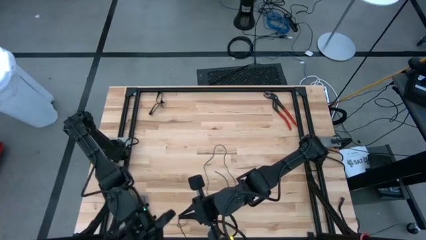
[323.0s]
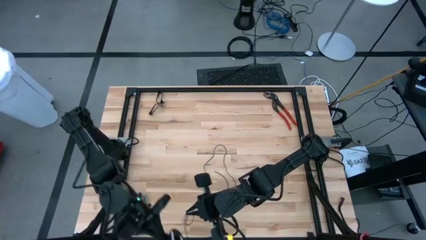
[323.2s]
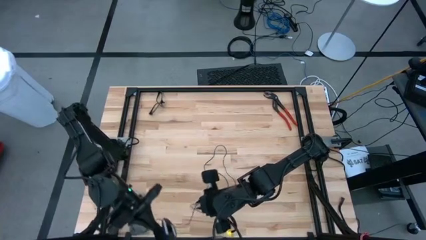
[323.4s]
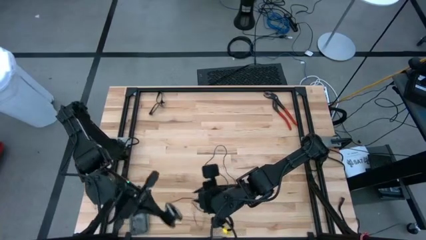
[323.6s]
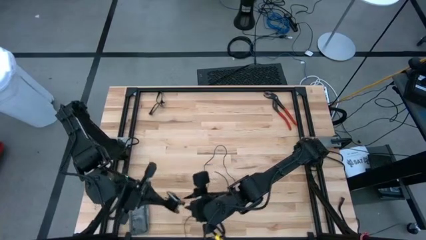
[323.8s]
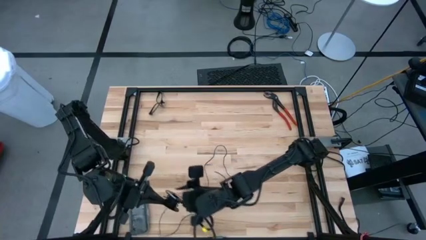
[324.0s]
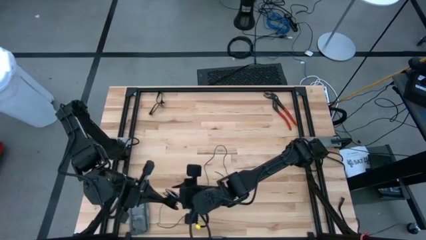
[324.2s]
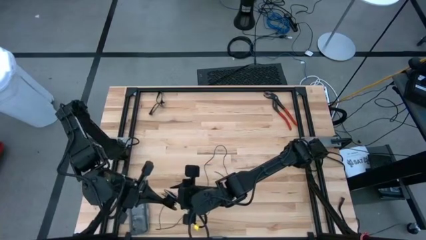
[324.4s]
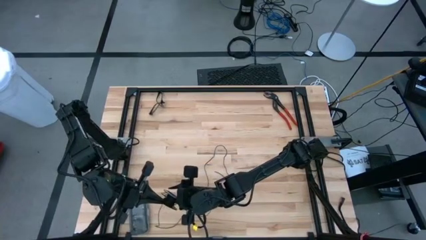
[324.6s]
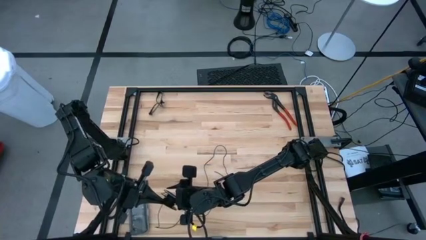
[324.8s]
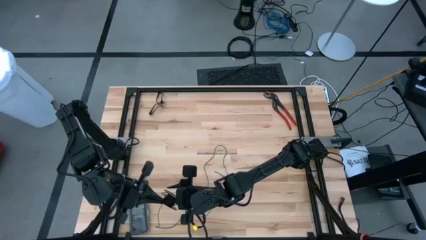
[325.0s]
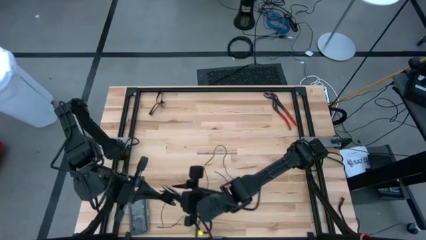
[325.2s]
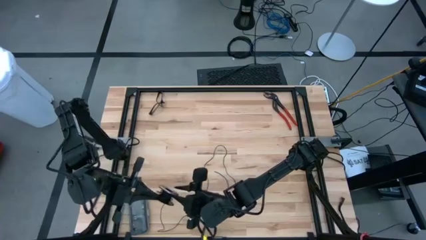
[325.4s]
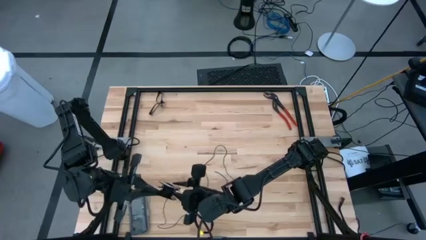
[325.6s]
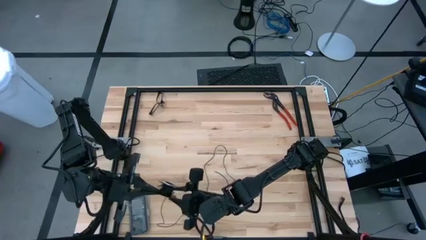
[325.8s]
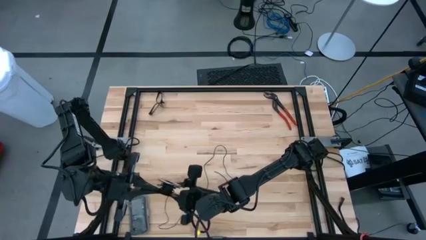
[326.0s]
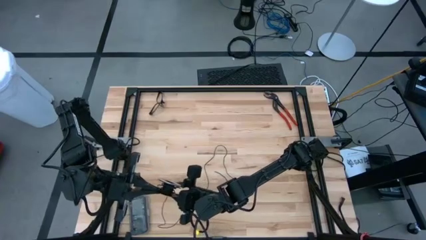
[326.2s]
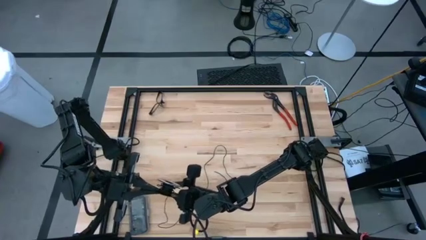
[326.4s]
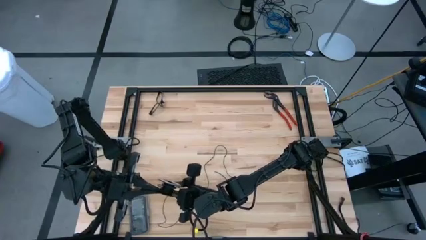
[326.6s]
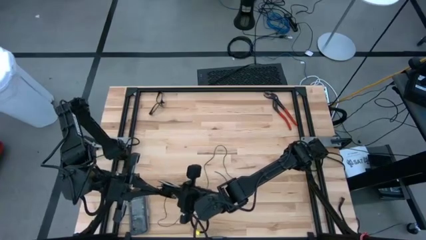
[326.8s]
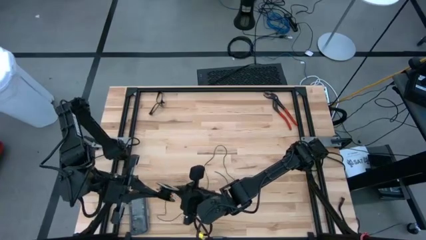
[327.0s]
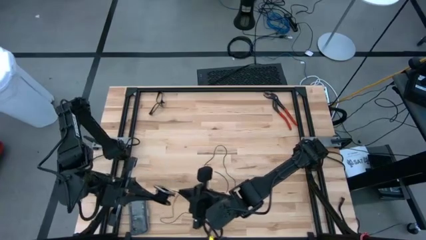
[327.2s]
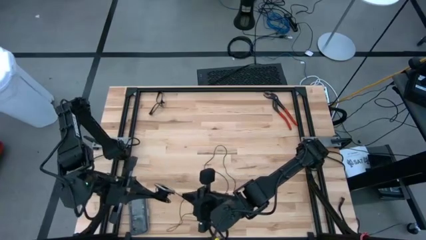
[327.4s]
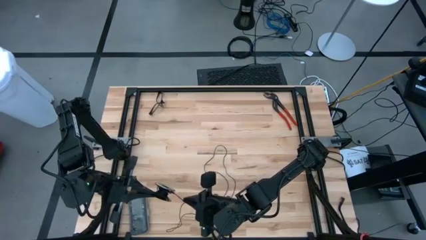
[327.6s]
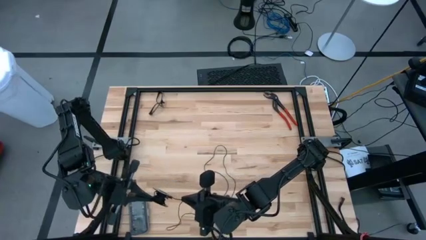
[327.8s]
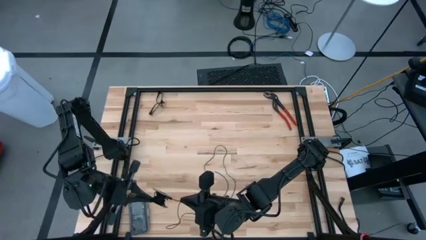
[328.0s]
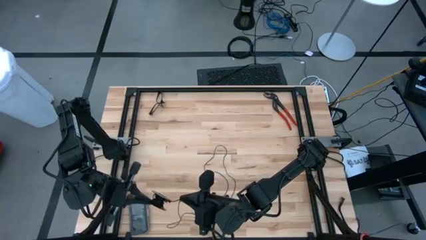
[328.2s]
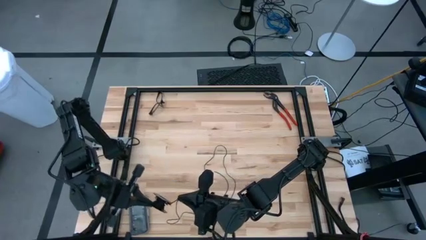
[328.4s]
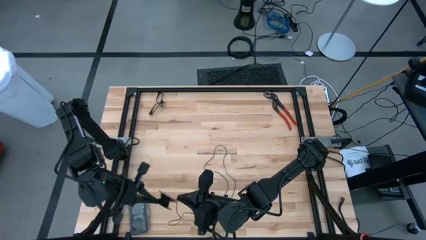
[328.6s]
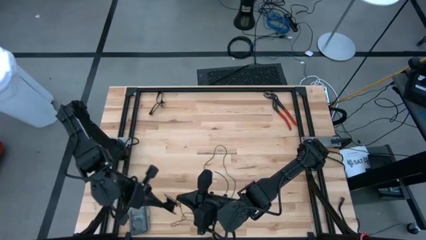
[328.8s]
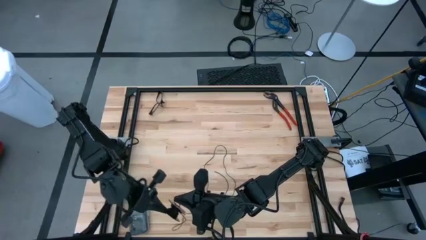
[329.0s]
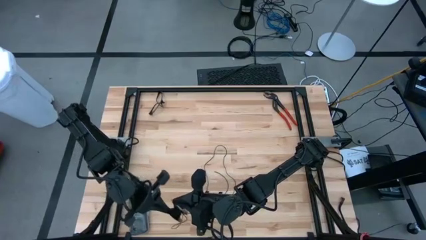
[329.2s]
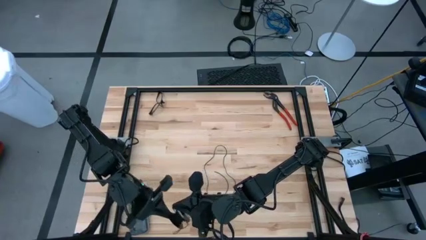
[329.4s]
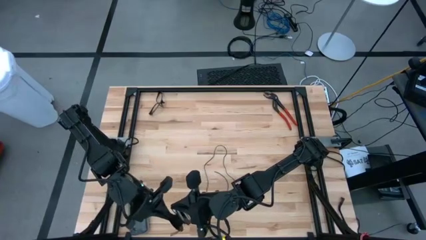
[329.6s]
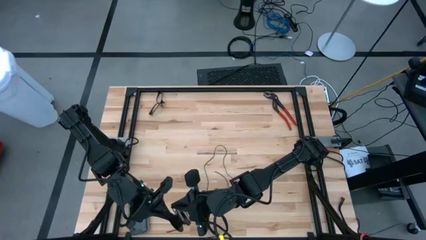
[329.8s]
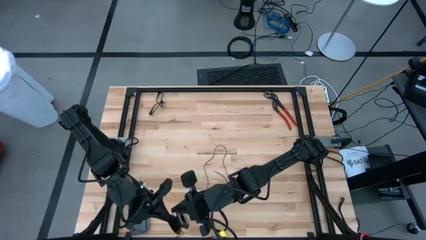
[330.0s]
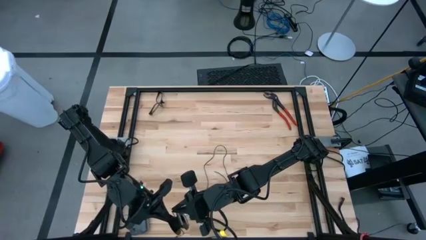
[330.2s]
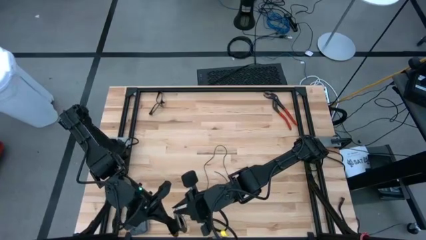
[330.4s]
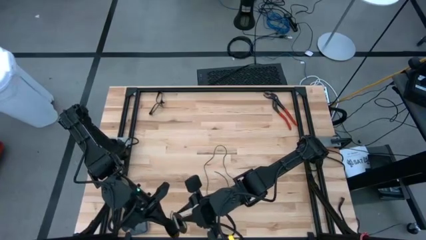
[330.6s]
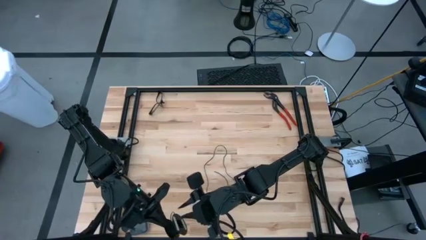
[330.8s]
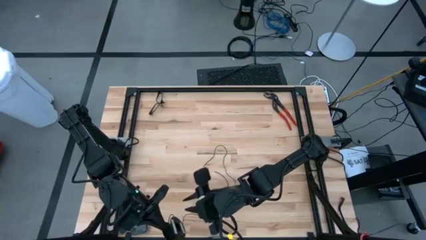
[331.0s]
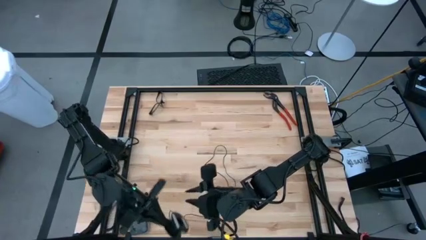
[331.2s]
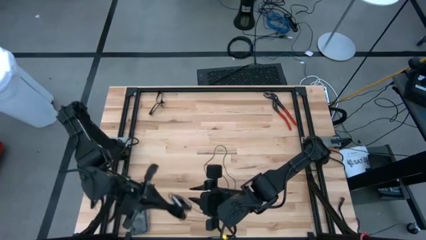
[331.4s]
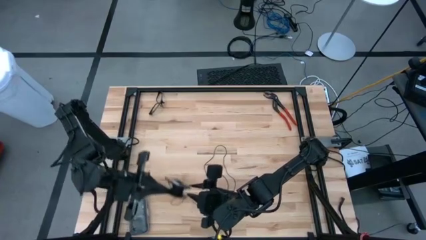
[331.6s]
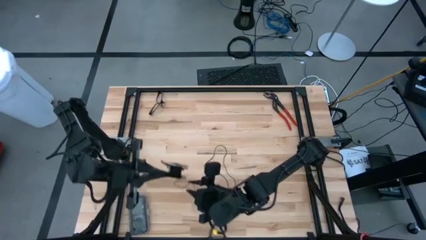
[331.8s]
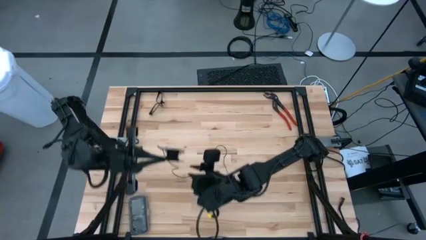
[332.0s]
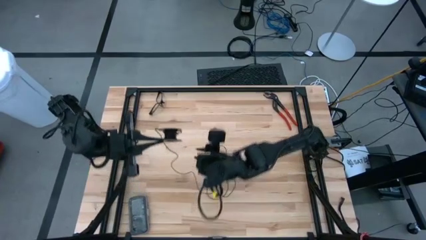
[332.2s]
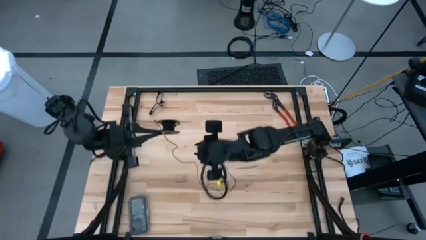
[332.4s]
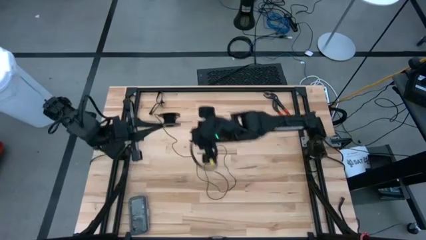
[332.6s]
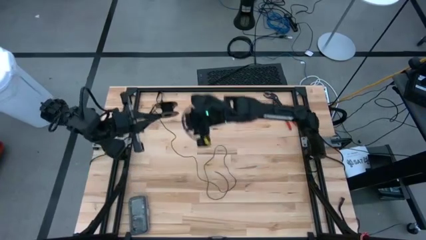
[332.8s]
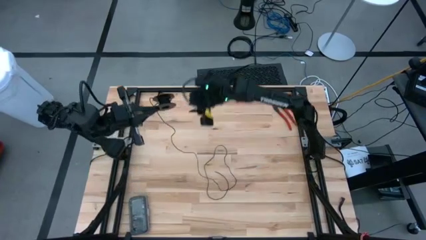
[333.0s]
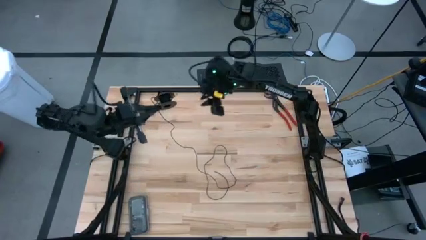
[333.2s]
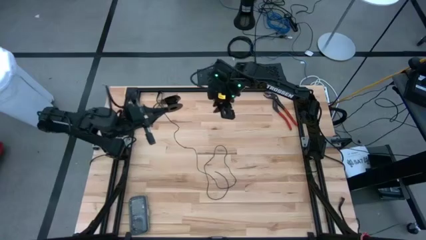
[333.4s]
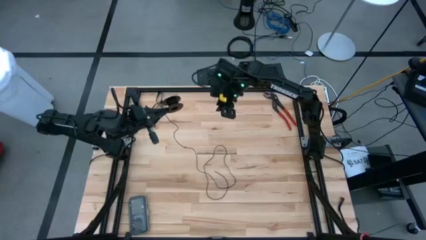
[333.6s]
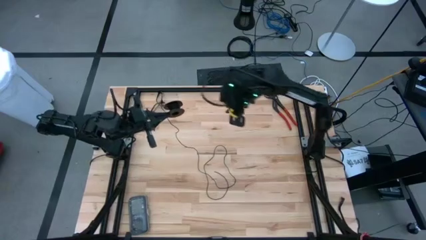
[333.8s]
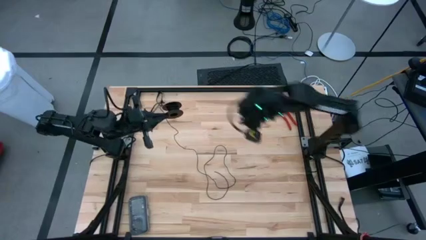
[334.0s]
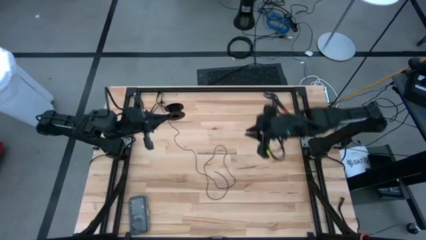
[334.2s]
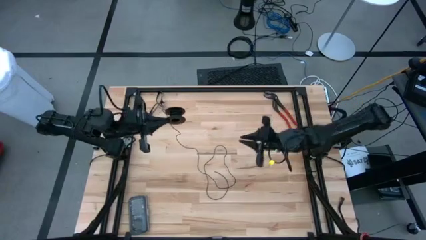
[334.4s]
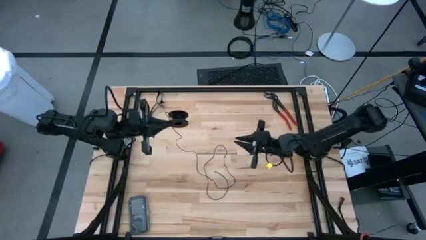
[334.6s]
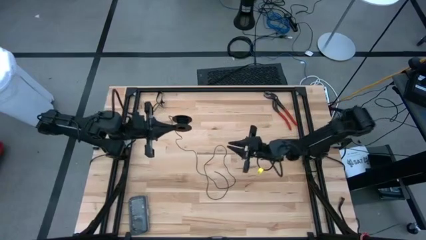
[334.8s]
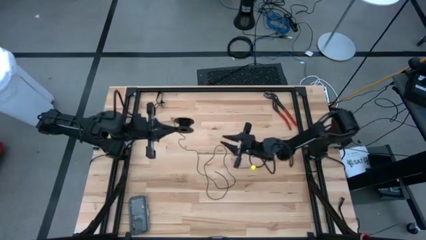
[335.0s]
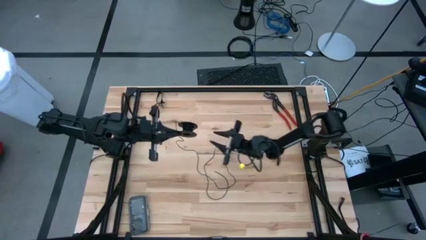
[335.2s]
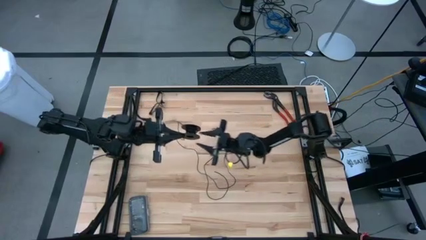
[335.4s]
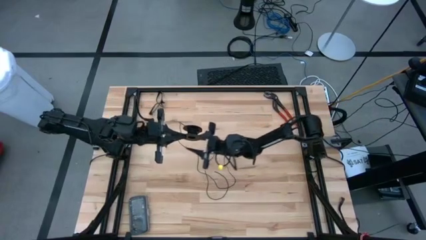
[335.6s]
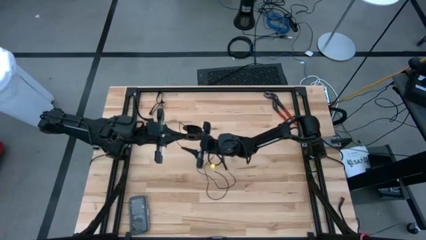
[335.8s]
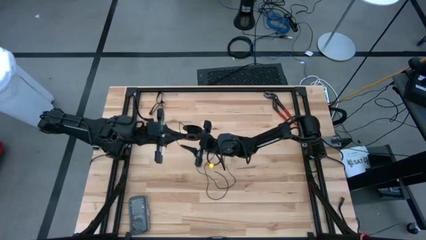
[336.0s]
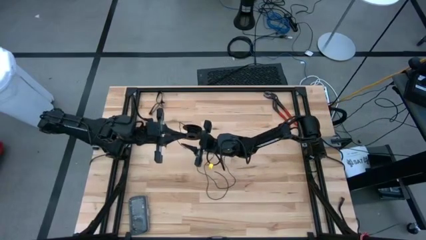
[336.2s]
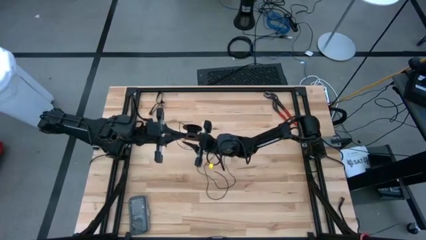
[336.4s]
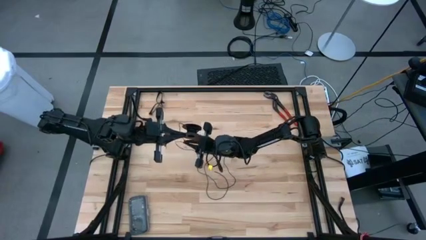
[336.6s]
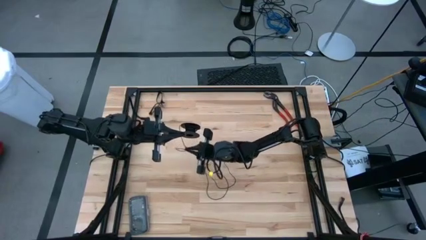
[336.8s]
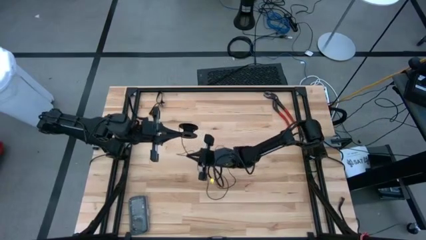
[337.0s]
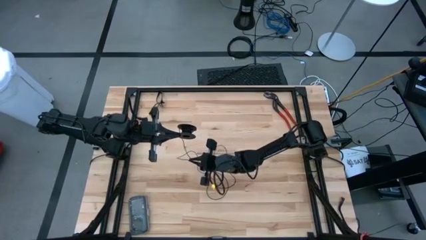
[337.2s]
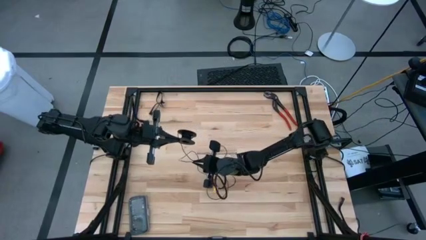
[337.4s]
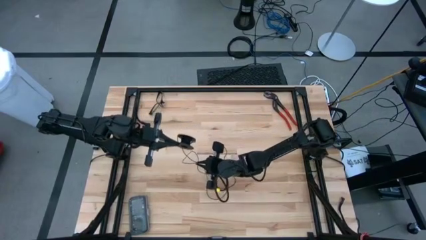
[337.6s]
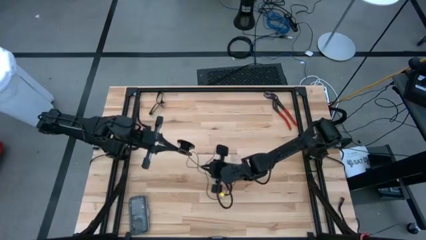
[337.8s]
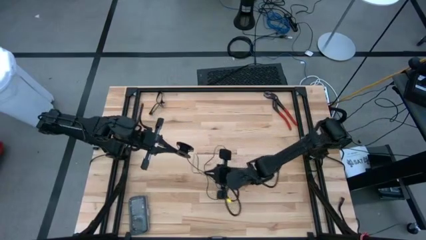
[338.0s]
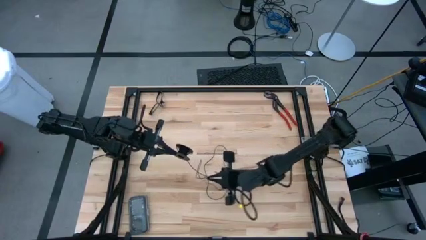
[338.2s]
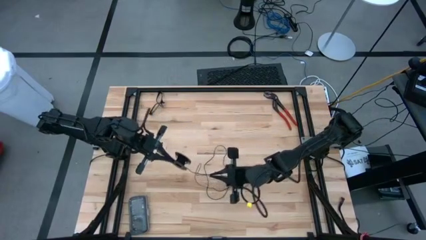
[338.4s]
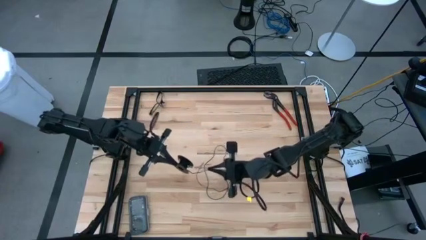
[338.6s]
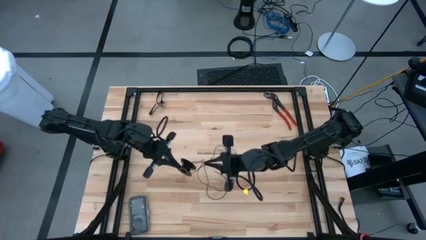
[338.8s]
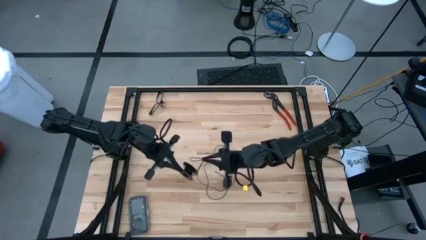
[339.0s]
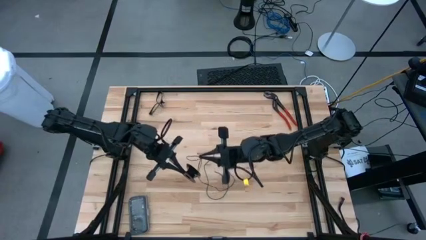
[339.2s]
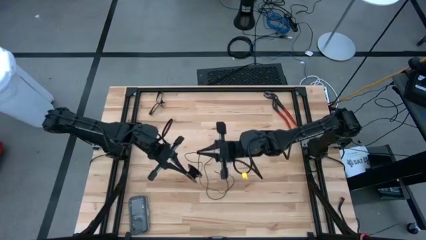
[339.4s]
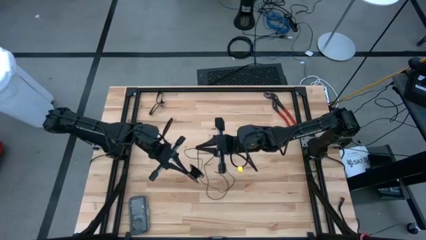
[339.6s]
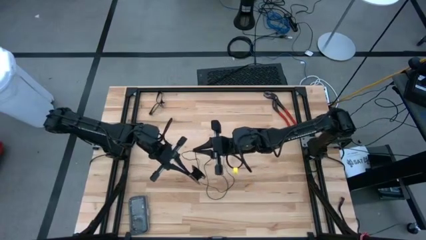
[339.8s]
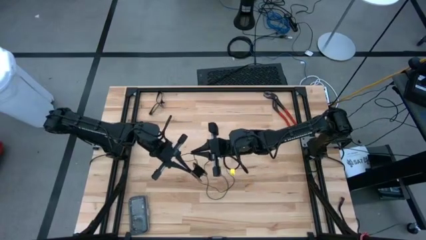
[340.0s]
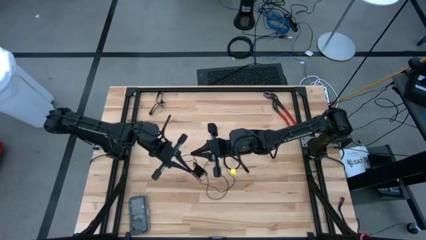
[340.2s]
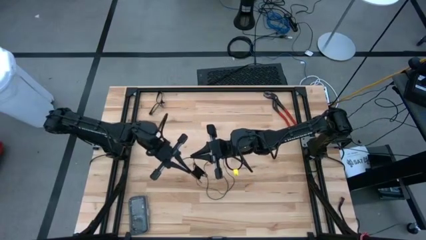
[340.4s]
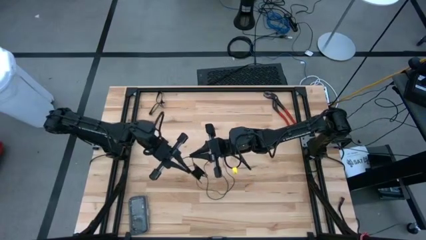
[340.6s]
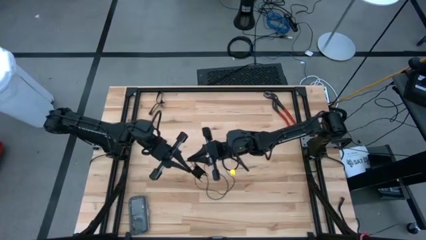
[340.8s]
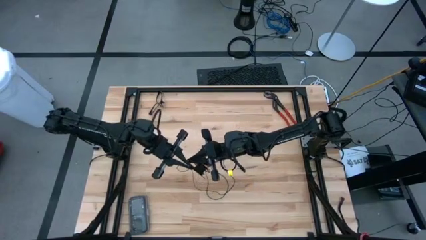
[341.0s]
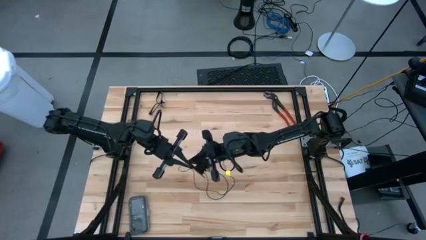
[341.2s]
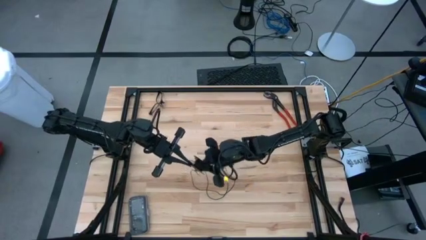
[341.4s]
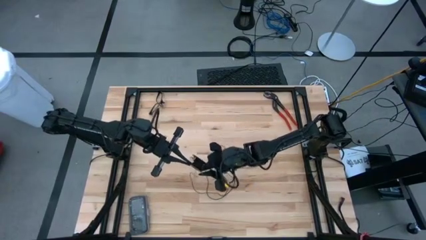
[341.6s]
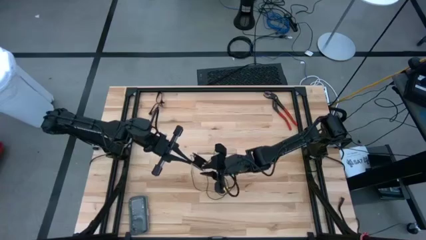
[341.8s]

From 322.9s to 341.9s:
Task: Coil cords
Coil the black wire onto the spool
